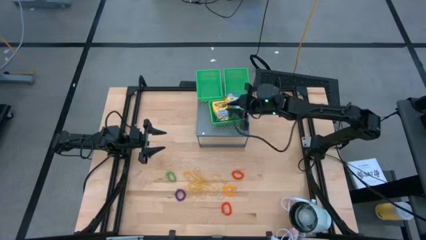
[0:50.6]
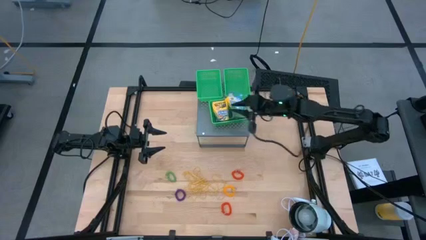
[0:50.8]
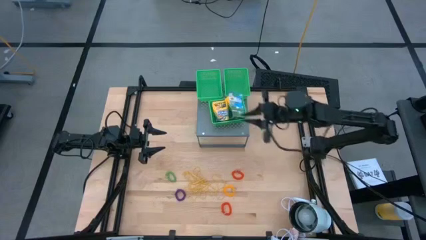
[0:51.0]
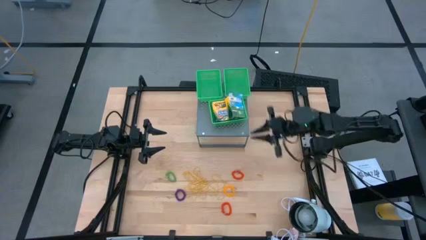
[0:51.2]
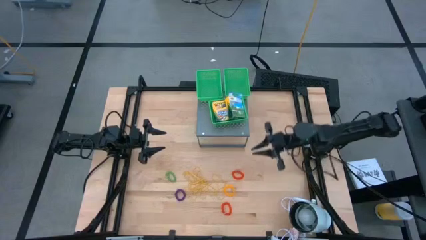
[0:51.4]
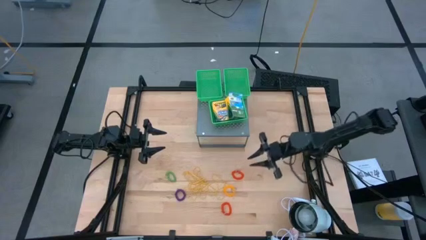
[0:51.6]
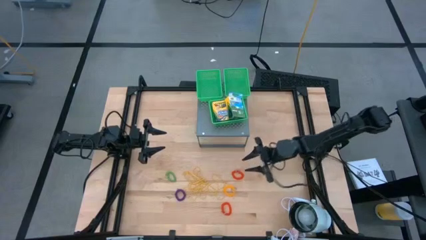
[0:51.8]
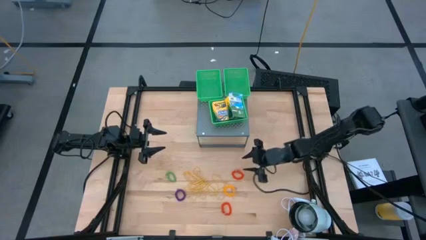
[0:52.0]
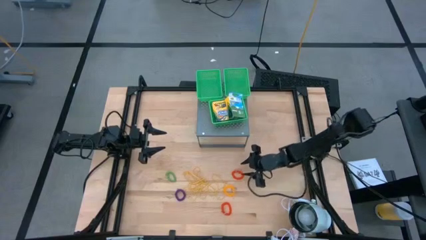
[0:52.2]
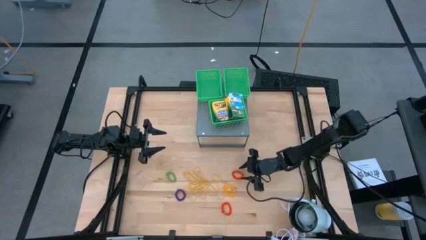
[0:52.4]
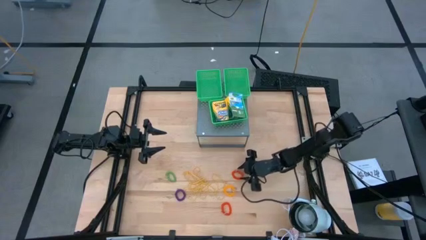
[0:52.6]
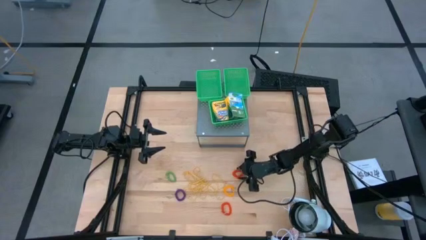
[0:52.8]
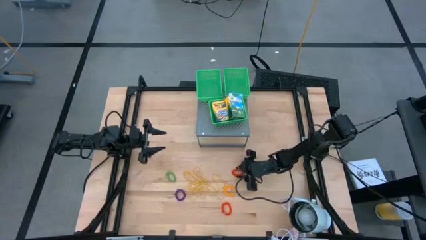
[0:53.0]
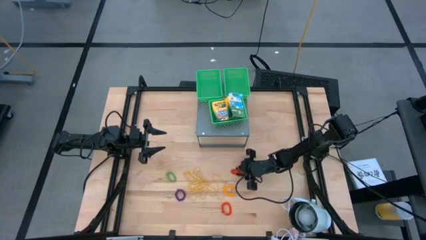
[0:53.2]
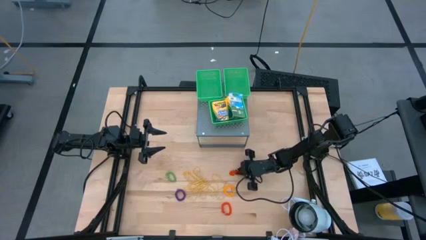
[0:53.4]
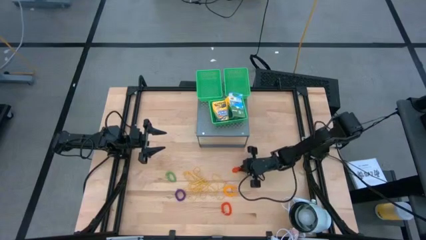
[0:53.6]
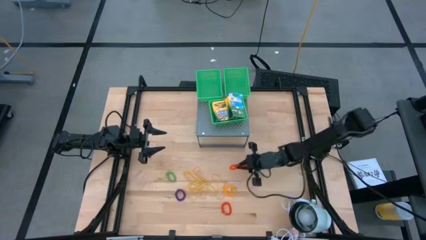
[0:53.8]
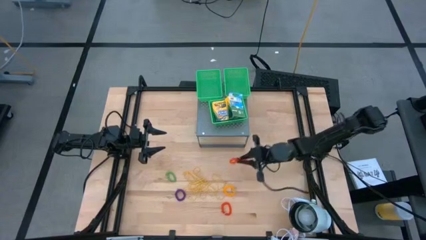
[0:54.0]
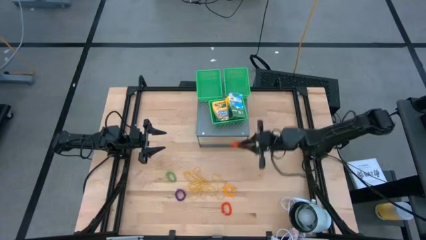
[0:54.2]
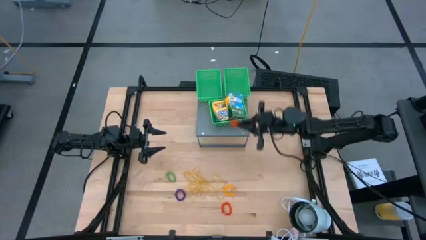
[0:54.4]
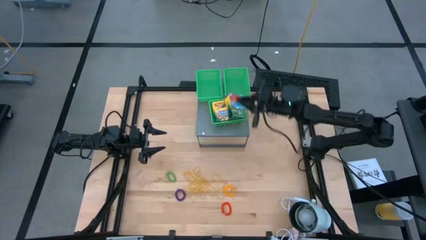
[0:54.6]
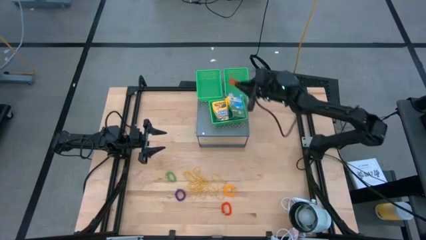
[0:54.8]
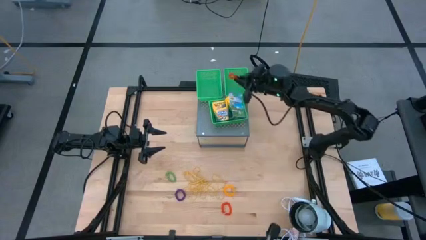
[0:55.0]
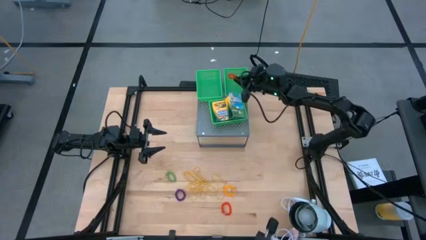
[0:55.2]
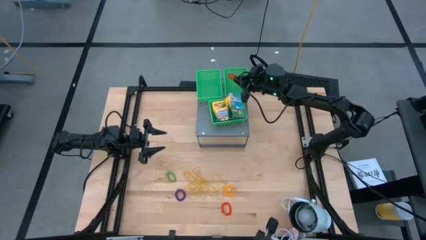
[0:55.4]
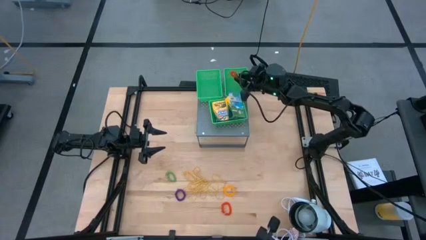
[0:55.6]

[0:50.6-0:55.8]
Task: Pick & Place Office Desk Supplies
Put the top orange spring keychain into the right green bin on the shelf

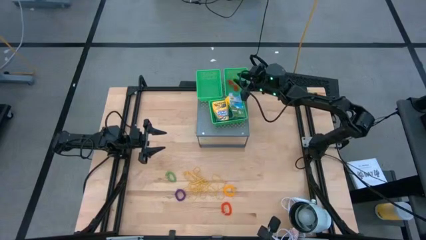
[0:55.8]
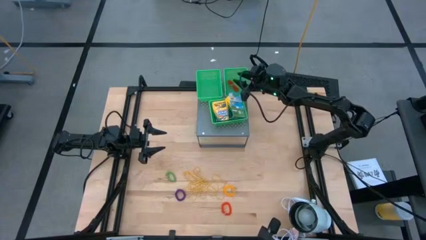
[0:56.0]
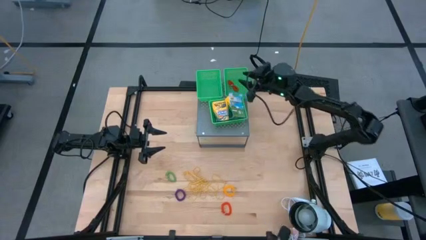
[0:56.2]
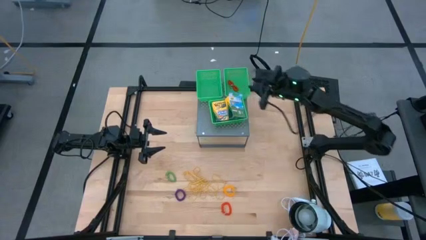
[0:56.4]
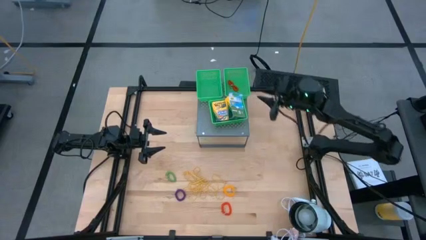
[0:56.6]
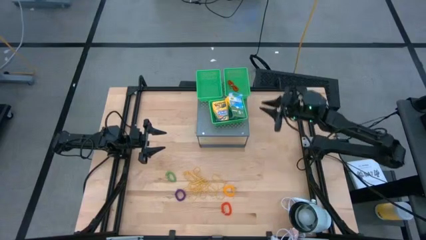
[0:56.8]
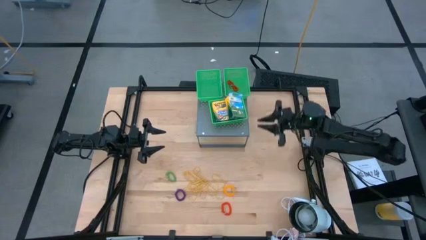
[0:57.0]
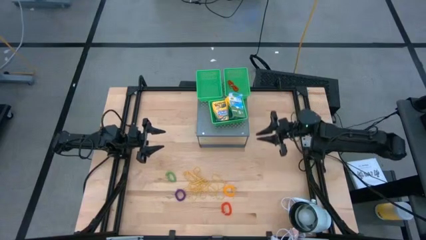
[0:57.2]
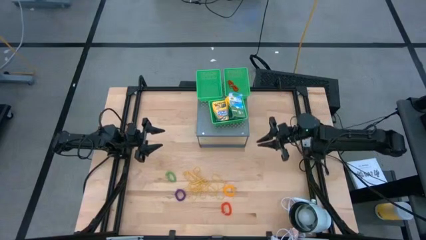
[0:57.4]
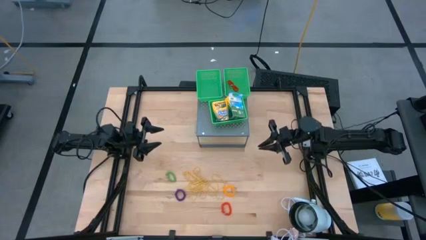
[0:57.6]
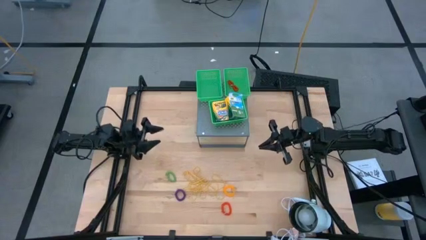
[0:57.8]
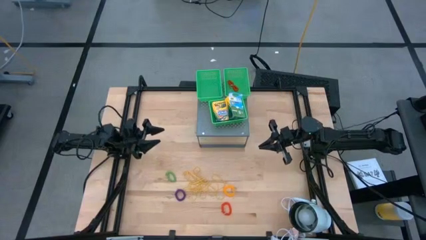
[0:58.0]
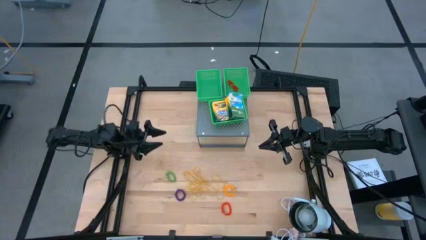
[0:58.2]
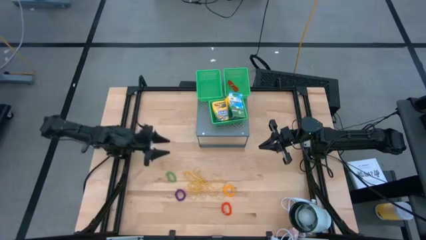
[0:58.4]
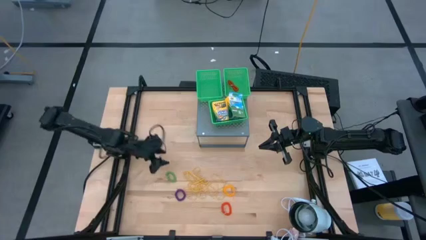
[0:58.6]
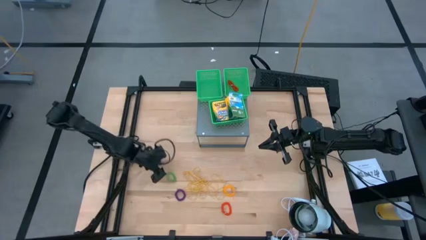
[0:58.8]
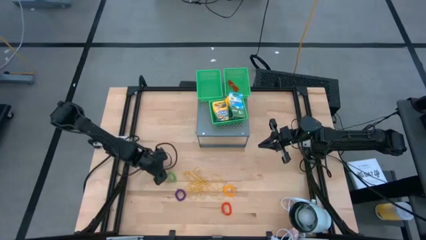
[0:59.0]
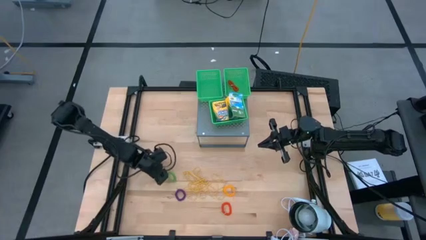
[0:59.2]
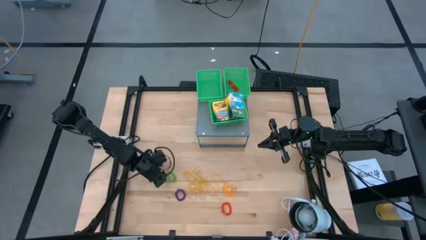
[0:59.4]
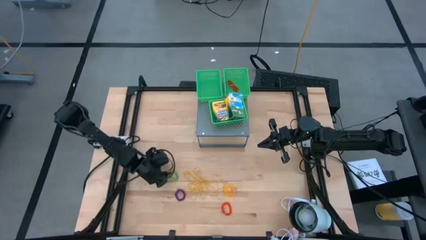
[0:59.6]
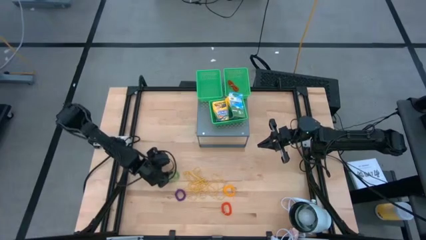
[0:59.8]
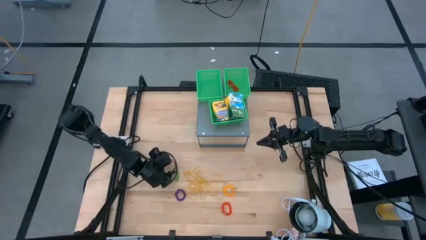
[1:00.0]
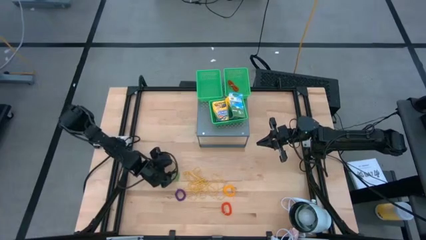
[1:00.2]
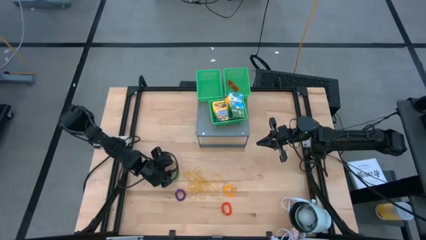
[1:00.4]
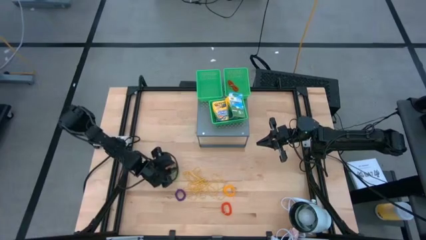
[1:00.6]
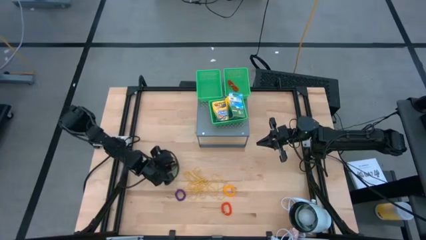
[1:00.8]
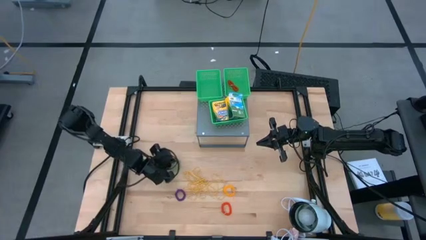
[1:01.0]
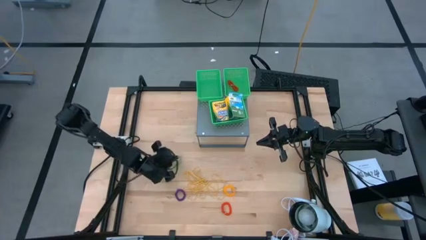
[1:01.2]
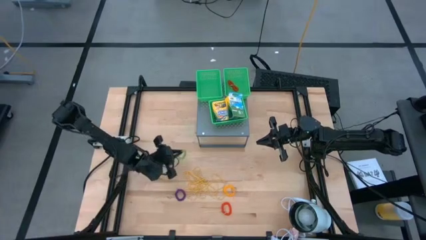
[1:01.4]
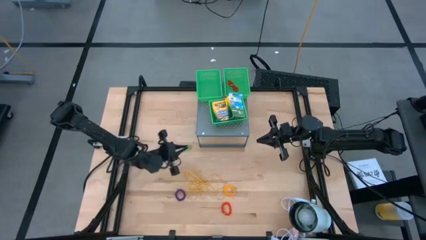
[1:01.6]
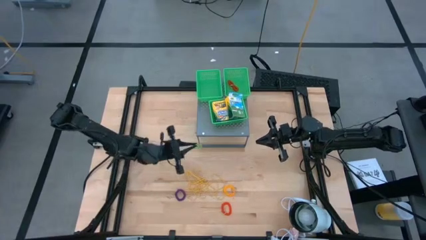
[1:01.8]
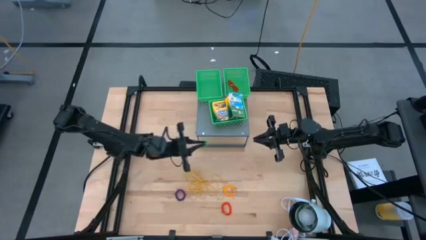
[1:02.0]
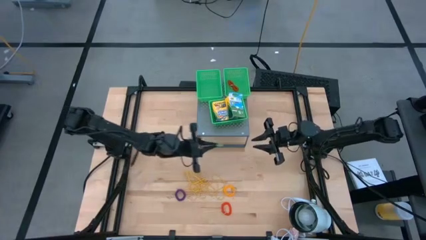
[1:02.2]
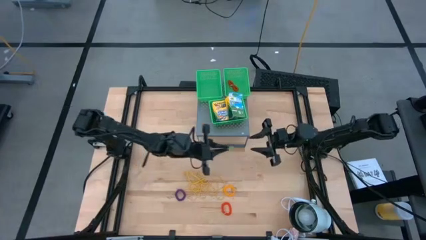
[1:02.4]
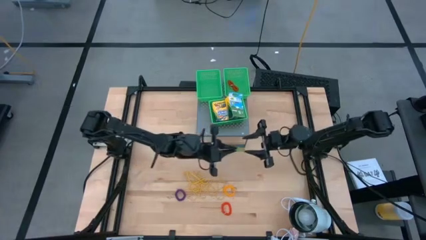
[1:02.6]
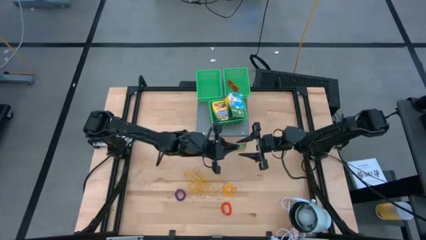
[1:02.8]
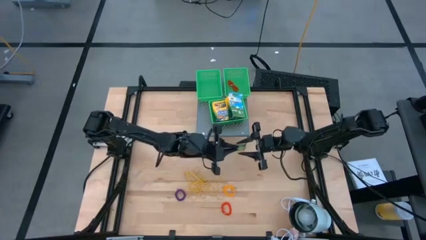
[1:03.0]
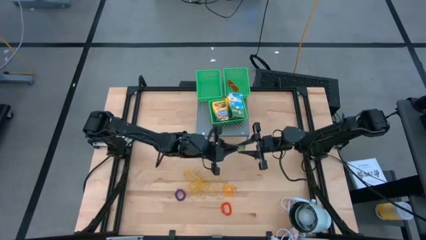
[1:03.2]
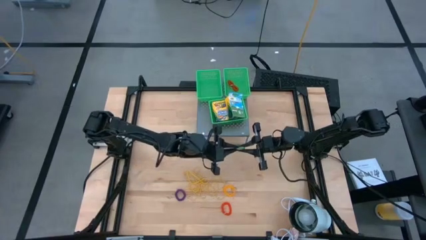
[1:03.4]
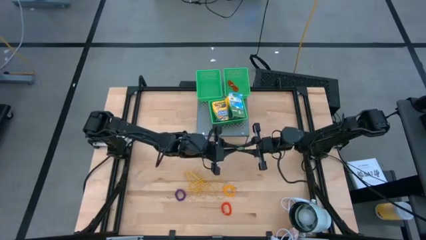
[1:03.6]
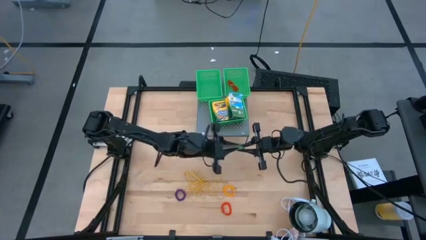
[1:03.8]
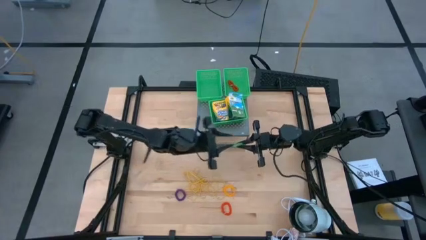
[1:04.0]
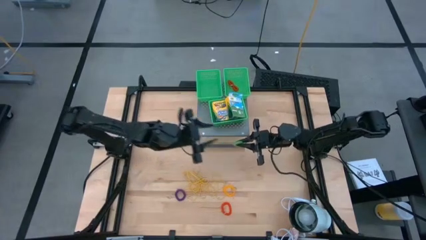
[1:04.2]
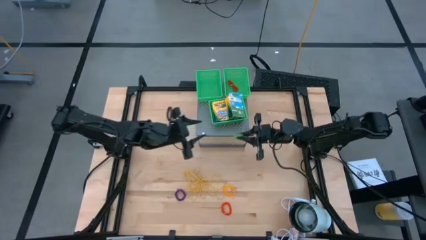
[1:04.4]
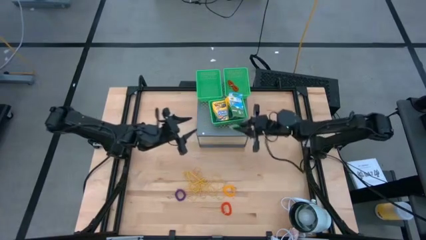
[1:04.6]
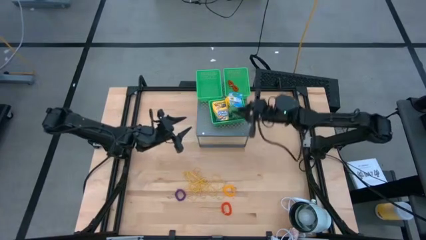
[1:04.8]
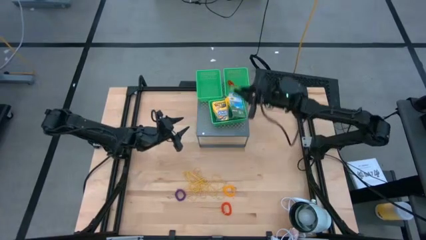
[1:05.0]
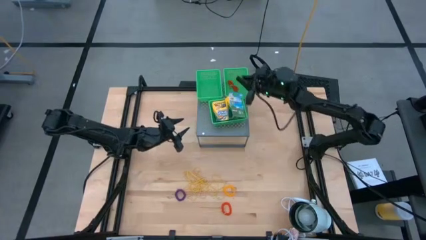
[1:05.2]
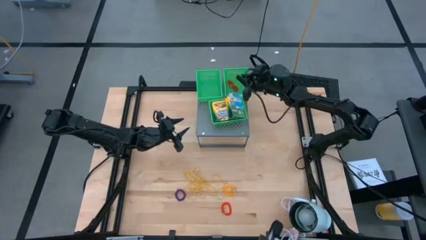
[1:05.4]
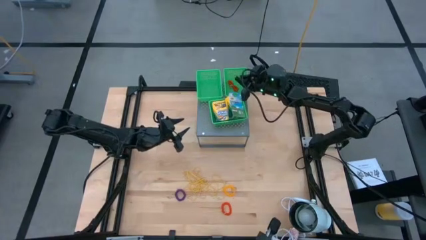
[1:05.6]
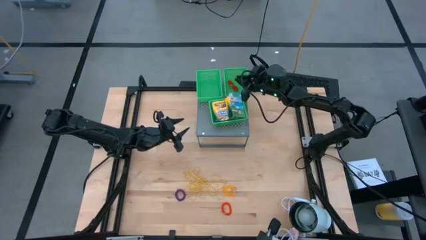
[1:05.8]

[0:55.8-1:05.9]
Put the green spring keychain into the right green bin on the shelf
